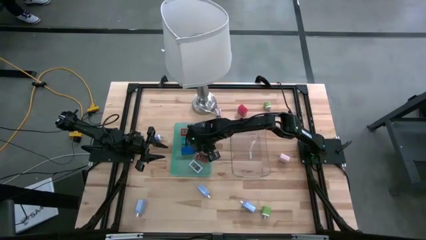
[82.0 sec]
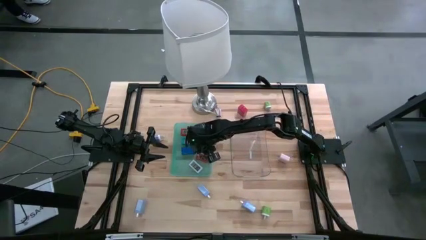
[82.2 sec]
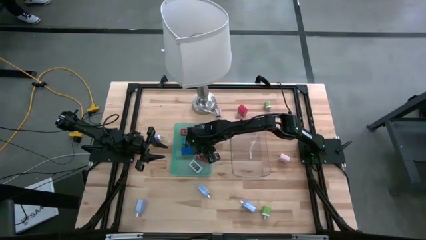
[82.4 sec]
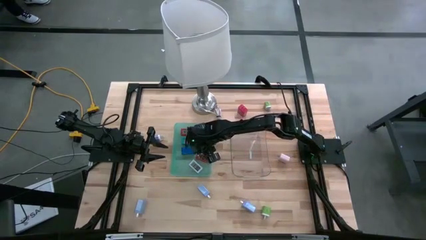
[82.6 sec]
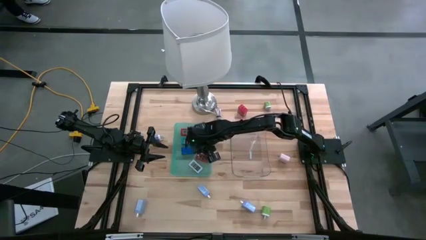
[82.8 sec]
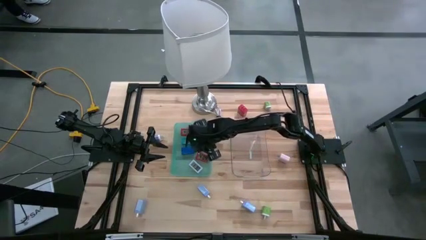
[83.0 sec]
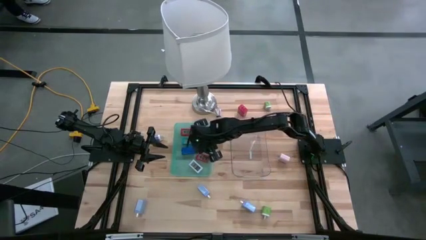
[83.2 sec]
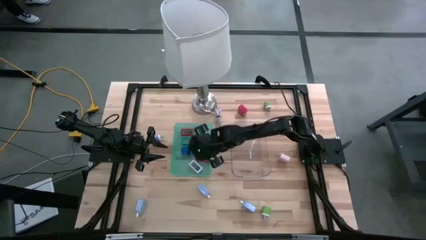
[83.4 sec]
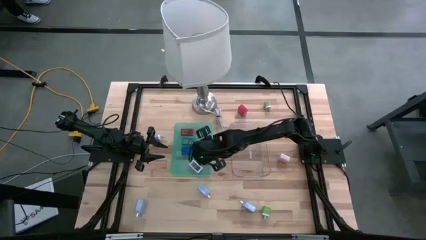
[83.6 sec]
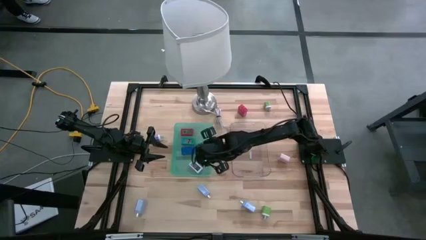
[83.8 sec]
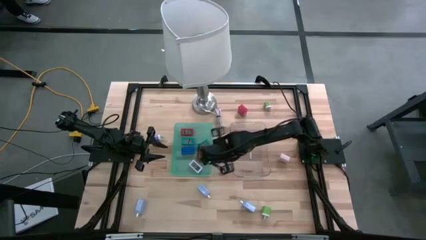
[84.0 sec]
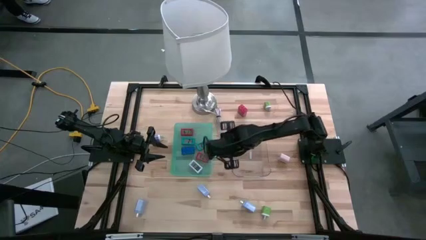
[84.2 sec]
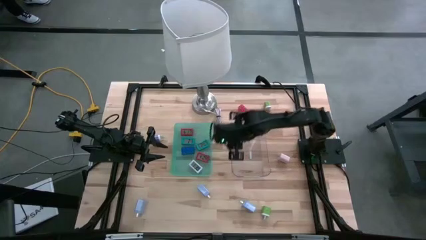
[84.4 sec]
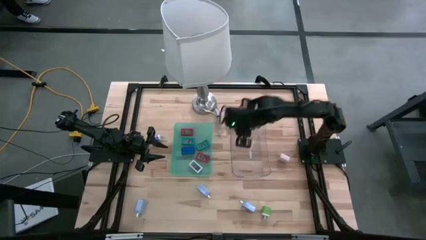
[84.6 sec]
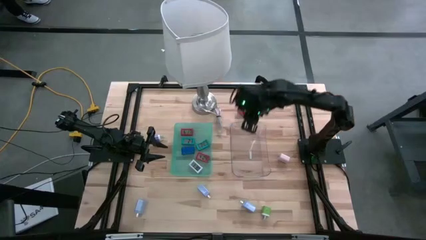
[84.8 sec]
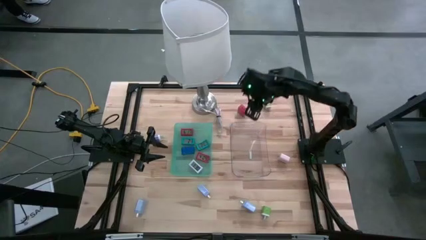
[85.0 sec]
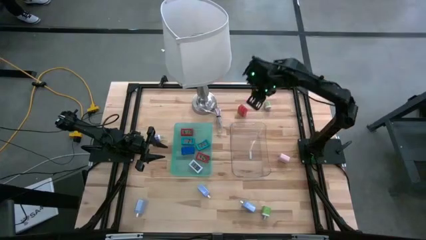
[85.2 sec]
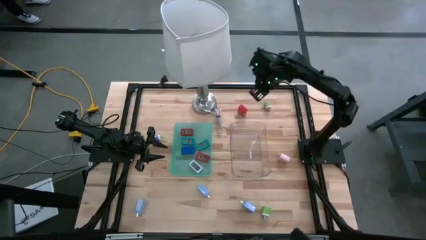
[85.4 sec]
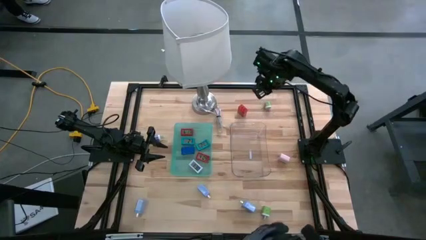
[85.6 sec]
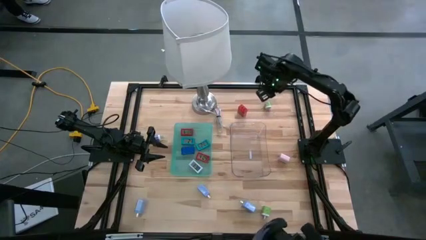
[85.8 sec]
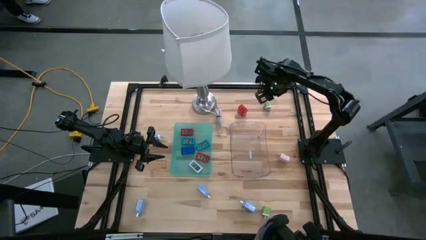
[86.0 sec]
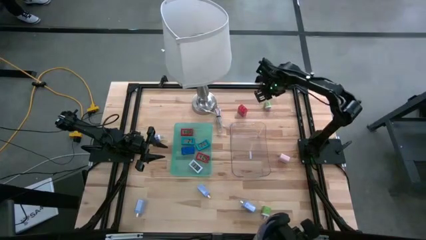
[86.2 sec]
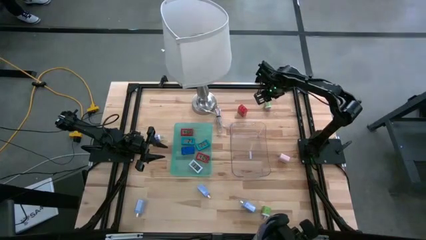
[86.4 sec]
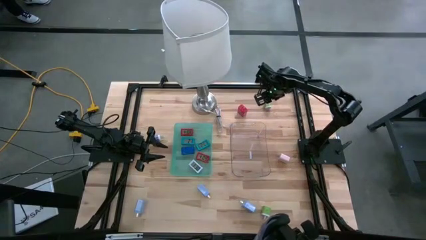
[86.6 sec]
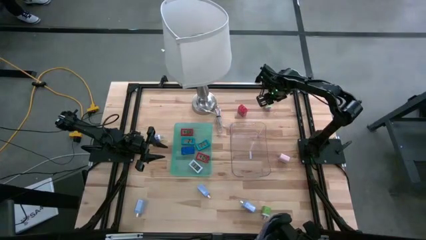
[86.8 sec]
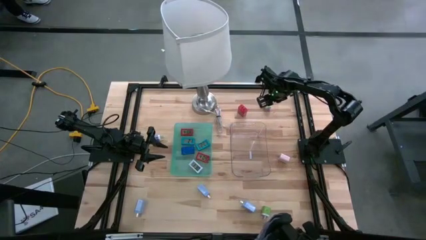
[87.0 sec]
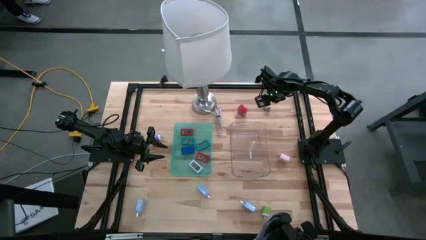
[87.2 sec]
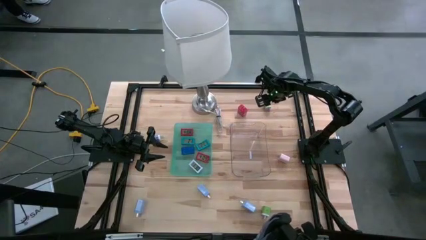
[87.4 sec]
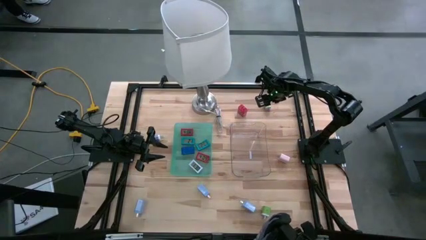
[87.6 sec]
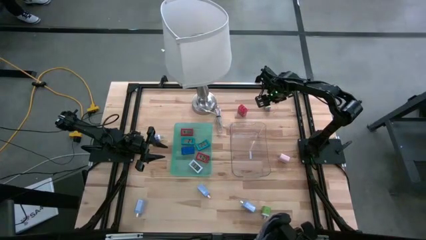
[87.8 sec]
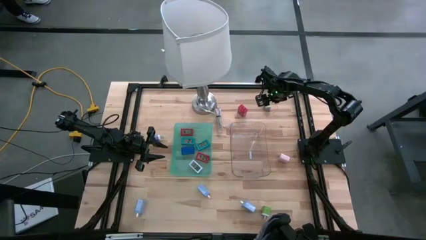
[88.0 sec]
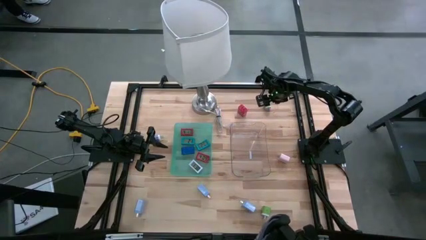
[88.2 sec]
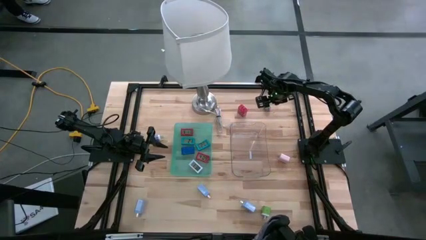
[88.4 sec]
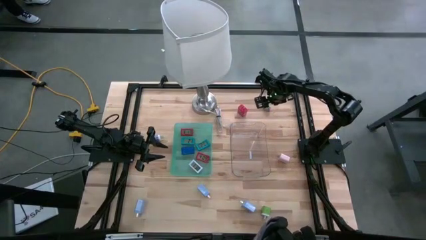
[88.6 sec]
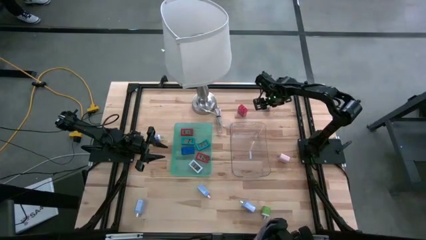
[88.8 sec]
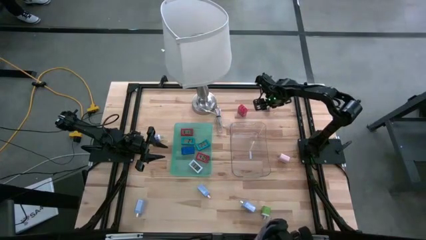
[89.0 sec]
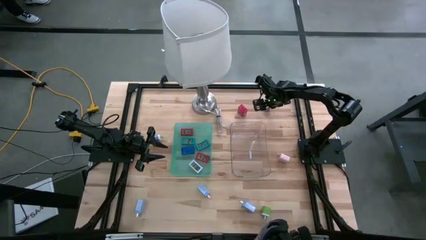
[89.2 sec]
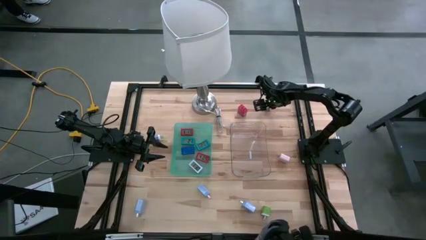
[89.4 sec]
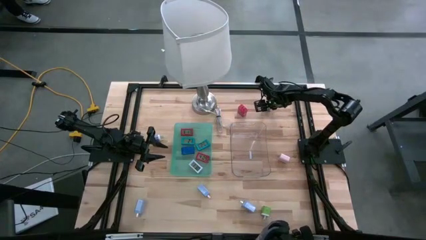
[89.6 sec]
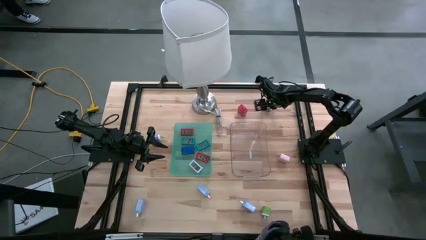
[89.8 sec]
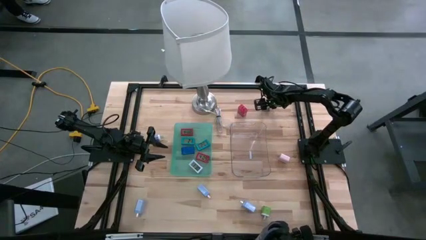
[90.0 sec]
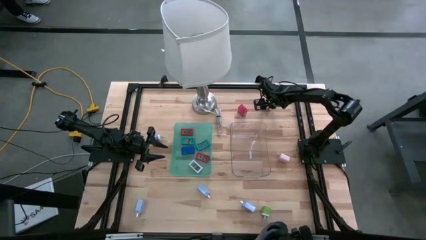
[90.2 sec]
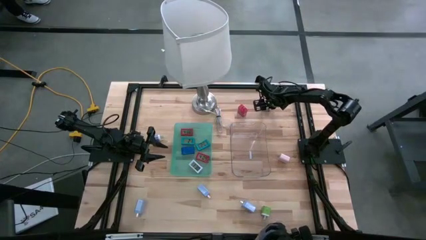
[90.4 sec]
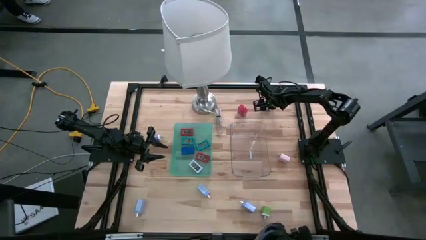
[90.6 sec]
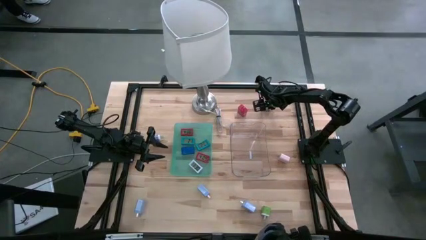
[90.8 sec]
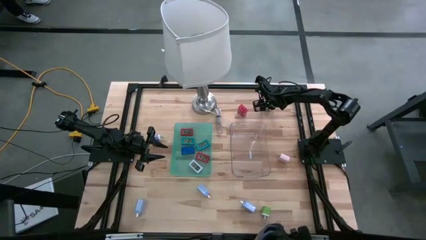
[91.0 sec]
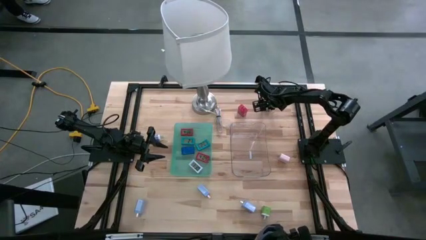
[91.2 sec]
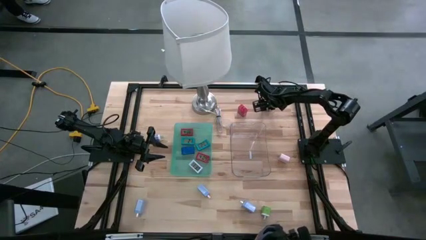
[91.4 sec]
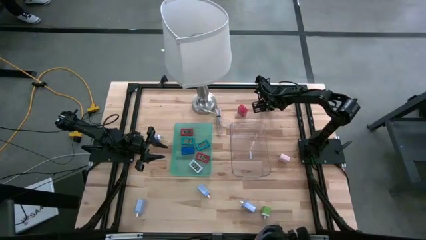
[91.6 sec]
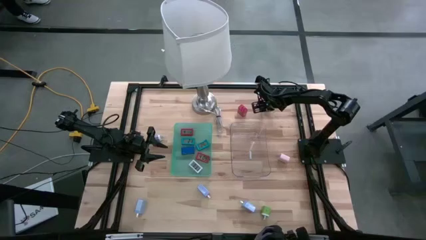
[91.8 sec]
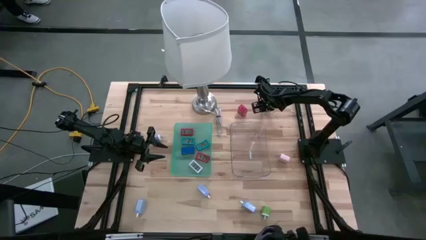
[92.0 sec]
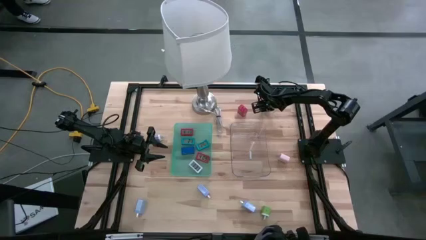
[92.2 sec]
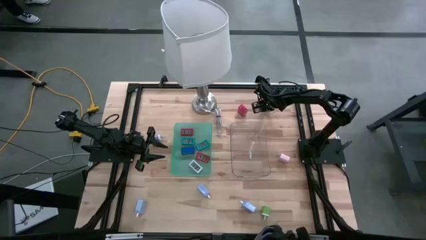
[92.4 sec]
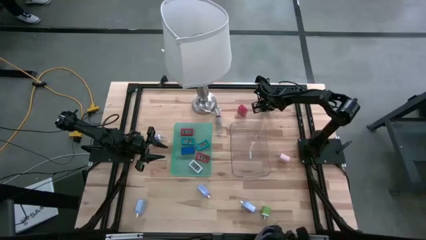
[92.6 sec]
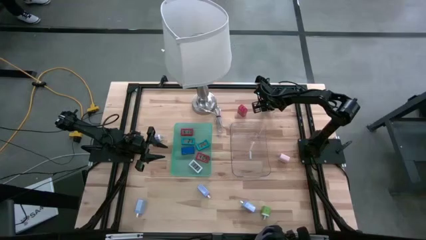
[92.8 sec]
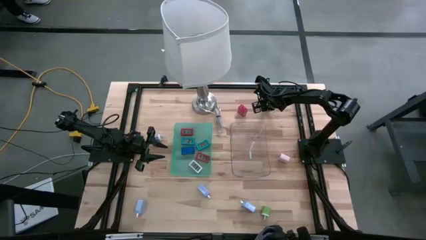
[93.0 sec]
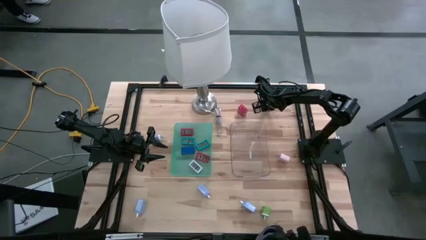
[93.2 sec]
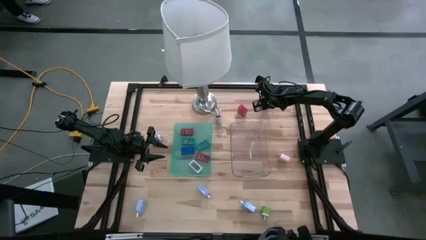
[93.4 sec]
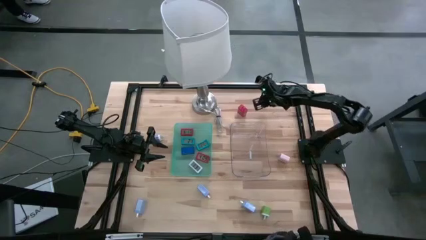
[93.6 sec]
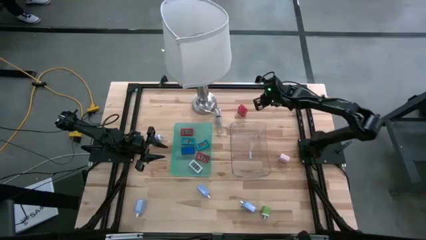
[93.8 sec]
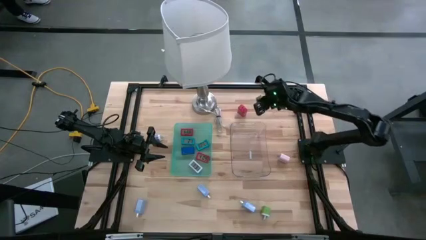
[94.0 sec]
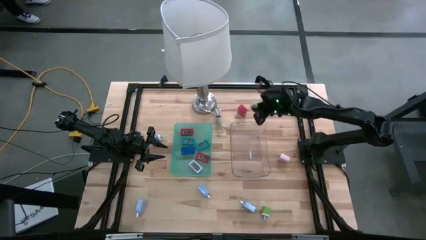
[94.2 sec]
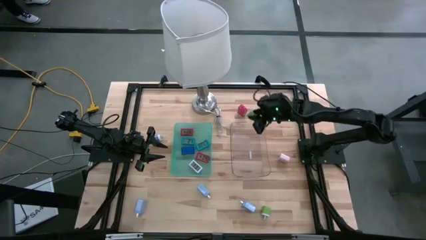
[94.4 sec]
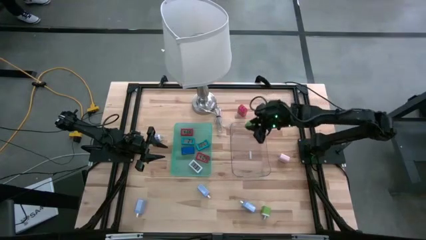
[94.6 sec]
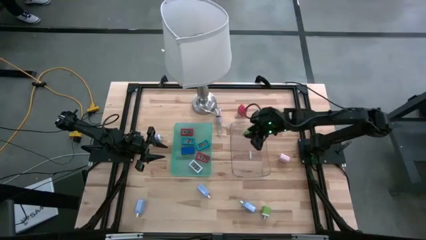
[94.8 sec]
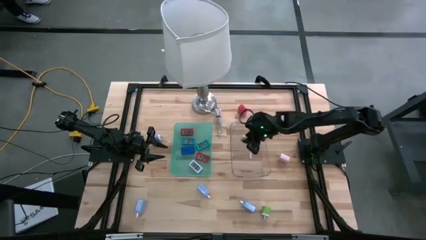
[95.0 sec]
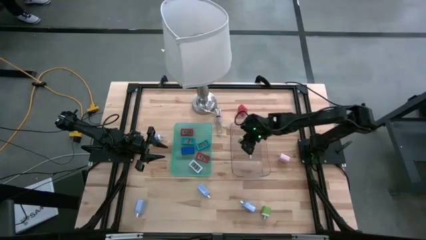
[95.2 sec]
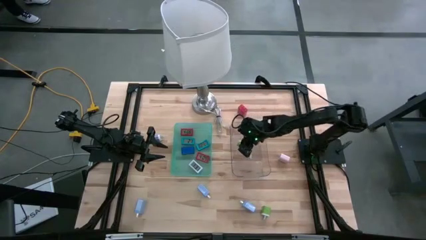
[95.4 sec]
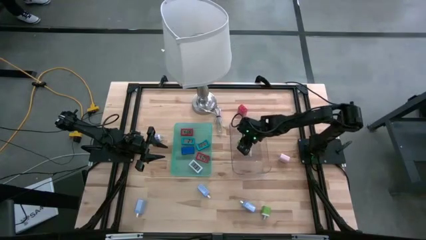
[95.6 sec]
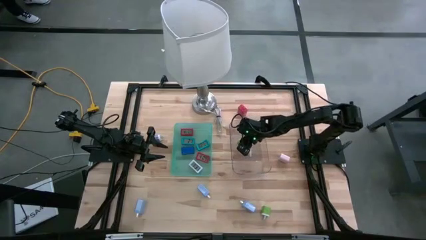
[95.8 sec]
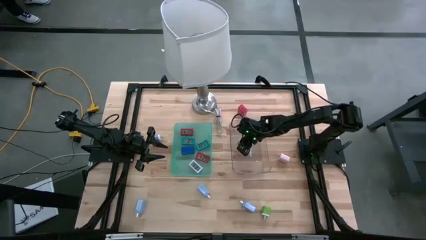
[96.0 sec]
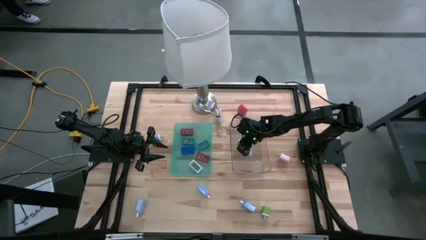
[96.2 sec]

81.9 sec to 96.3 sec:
Task: Pick & Place Office items
Put the top green charger adapter into the transparent bin
